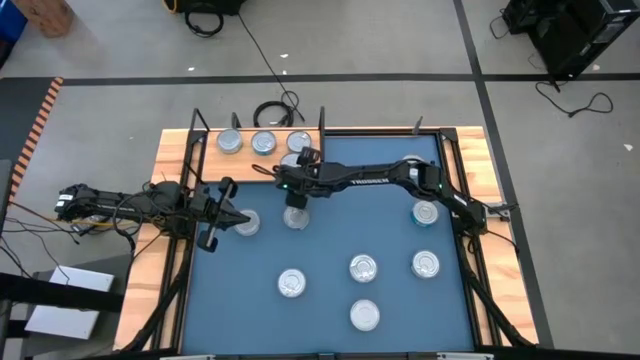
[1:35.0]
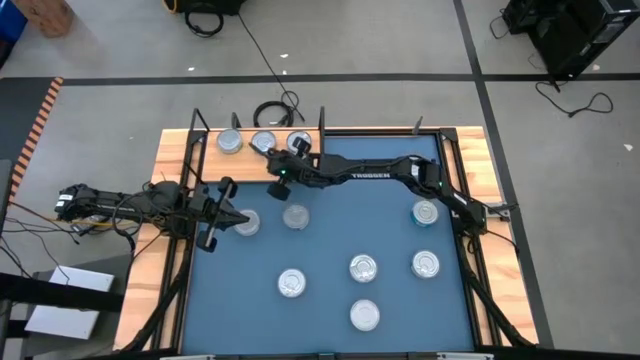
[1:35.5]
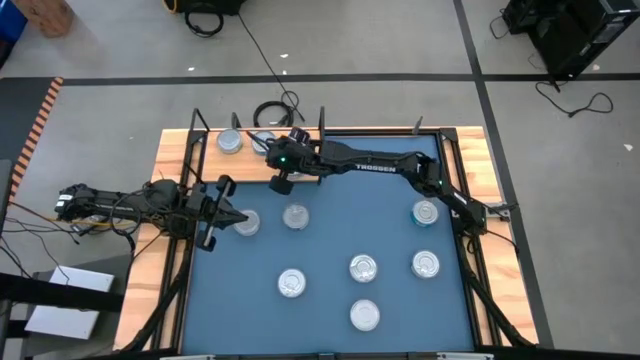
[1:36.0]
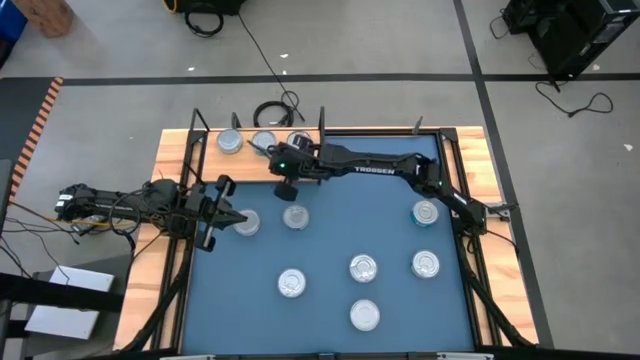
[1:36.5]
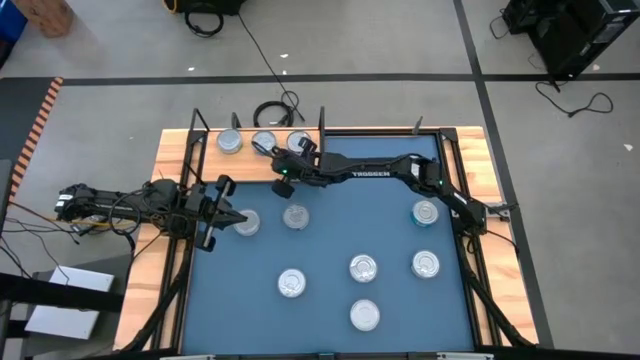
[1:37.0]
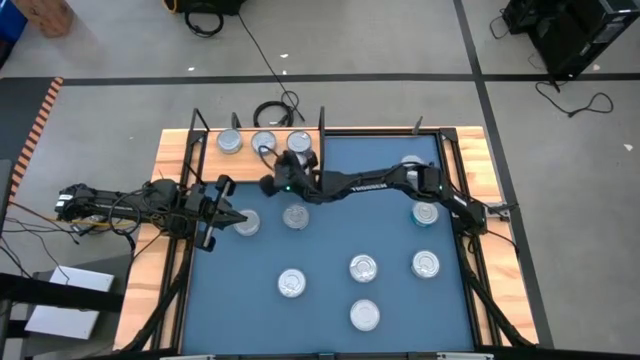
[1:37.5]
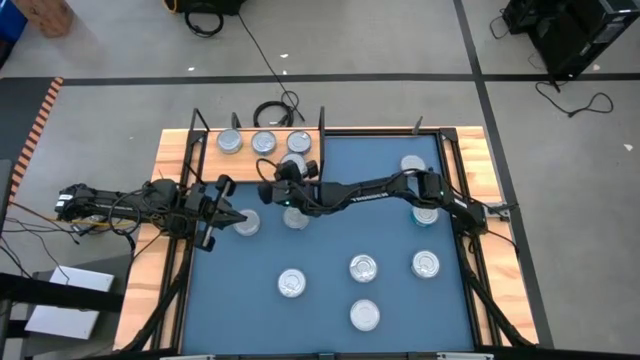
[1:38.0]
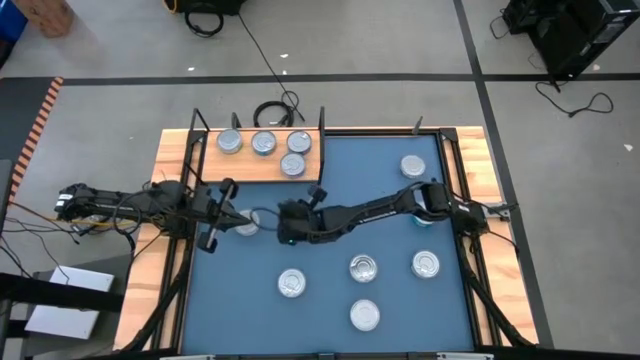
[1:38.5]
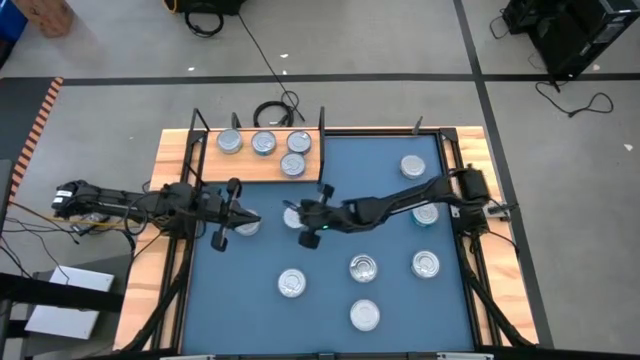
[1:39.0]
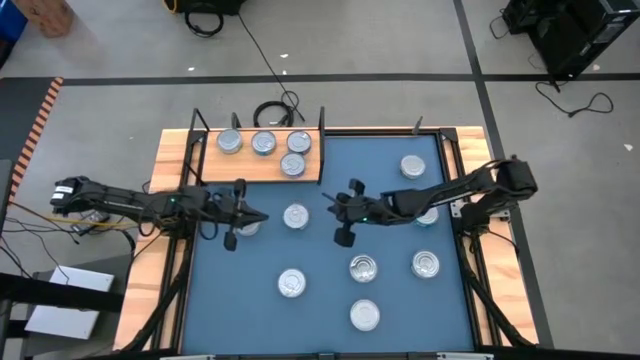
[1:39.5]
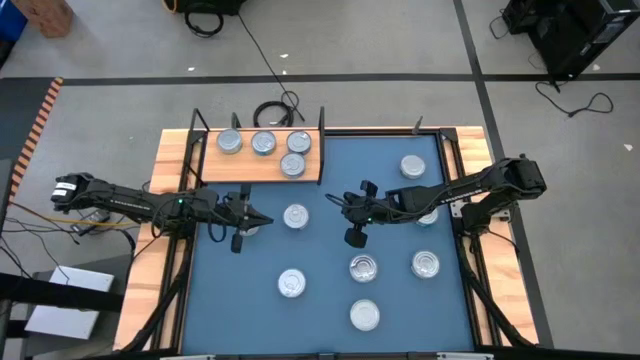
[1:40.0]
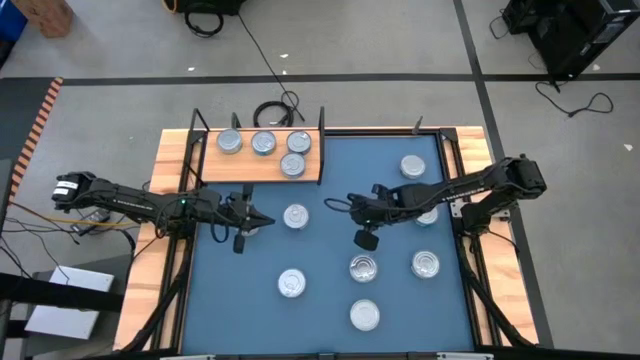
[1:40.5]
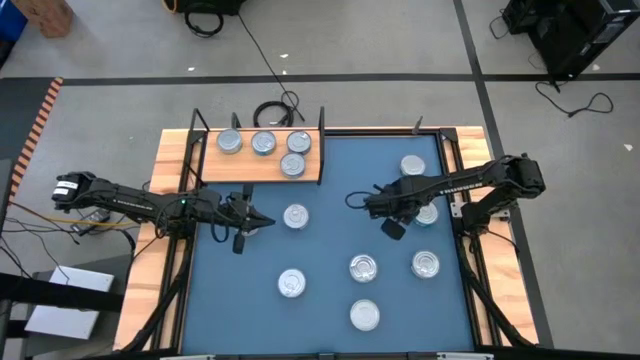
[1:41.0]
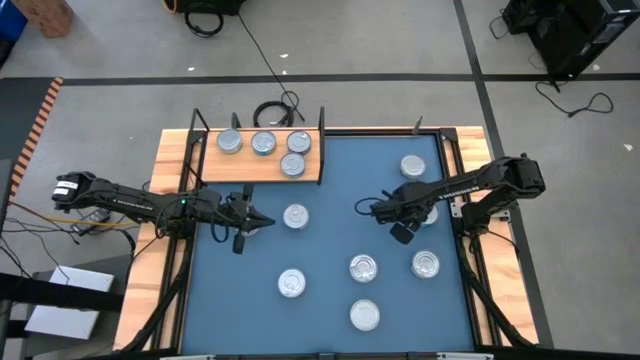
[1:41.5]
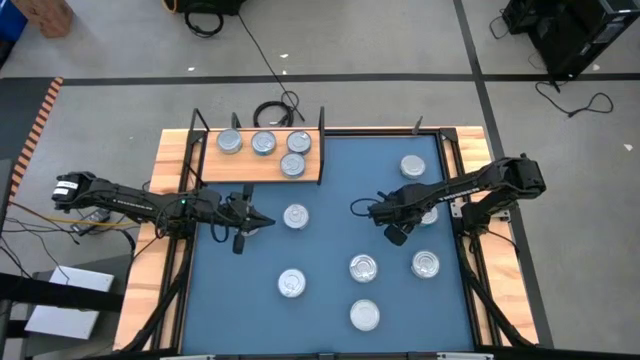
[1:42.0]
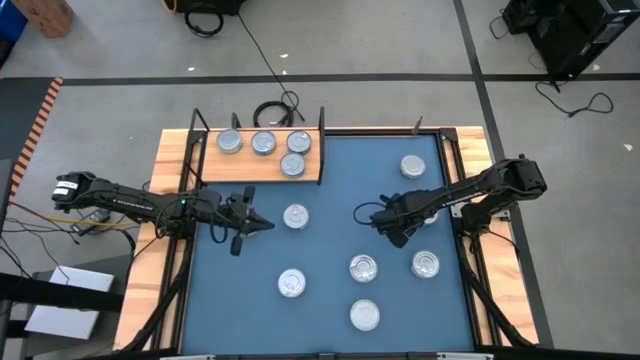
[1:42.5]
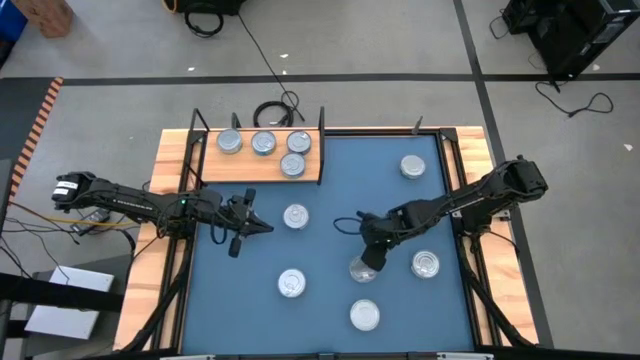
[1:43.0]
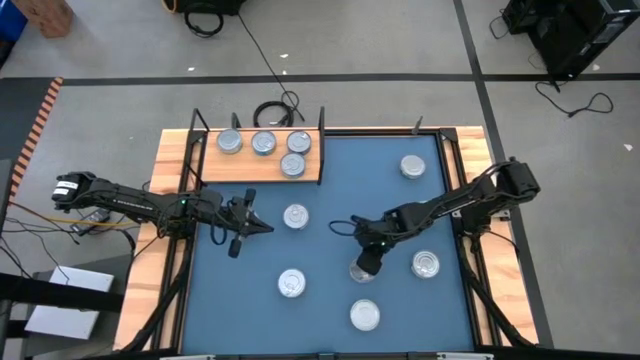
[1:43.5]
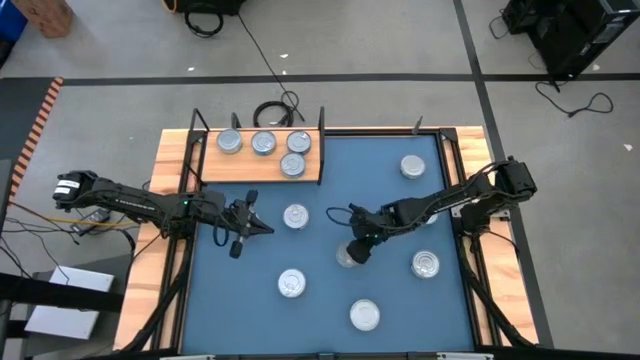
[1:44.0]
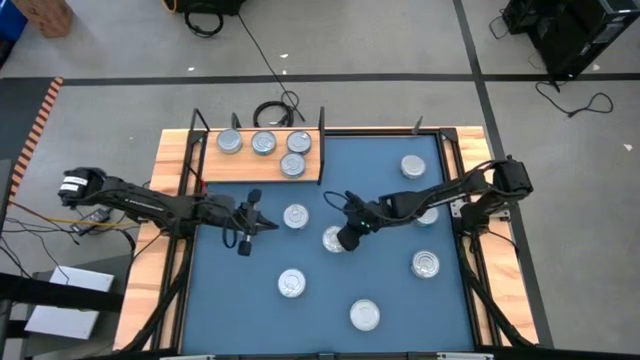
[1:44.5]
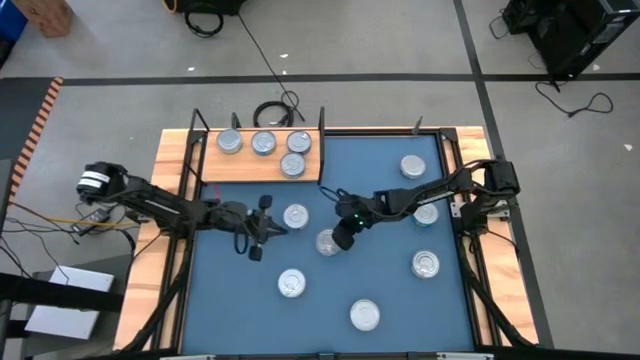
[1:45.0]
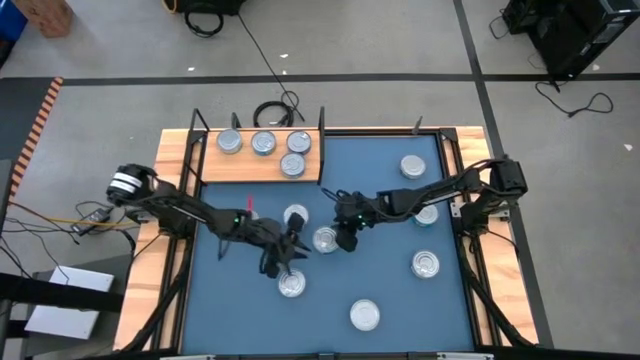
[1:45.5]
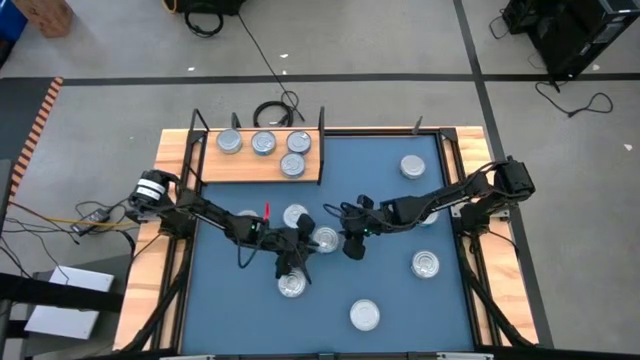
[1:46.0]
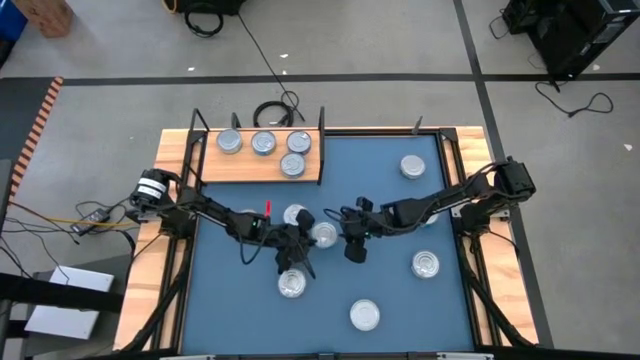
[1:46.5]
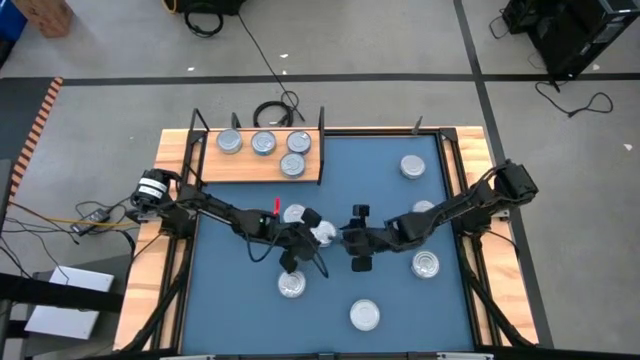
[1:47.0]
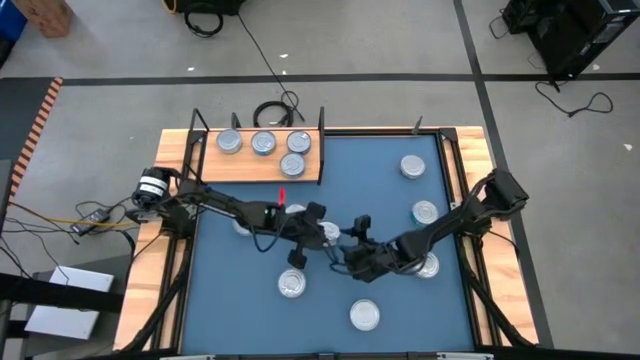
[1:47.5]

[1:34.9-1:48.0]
Task: Stack canned seafood by type on shelf
Stack the yellow blue tuna can on top of the other yellow blue tuna can on the shelf

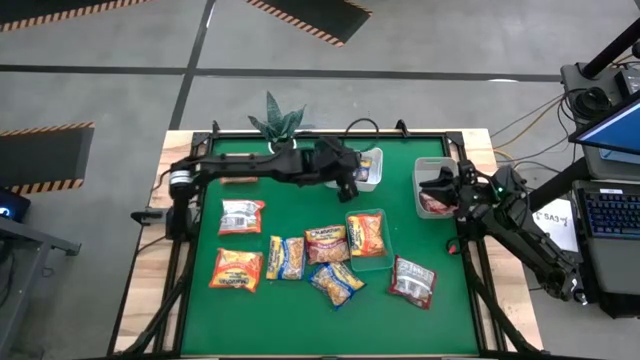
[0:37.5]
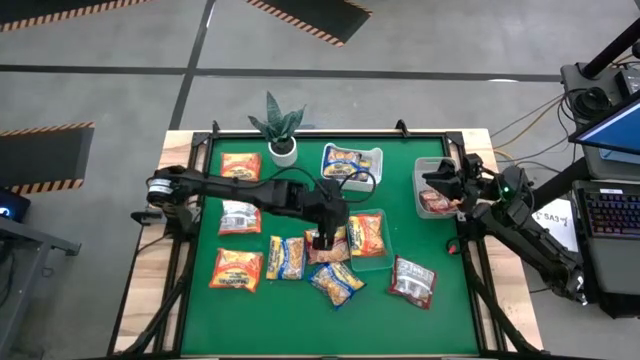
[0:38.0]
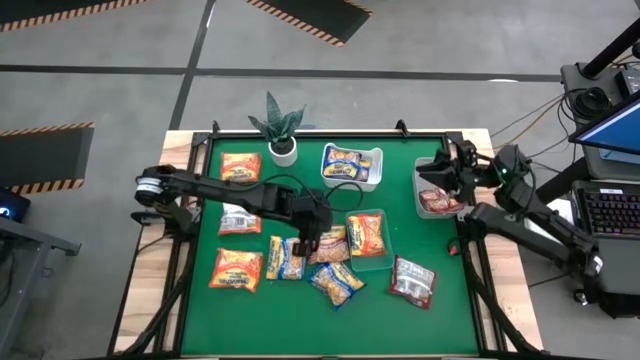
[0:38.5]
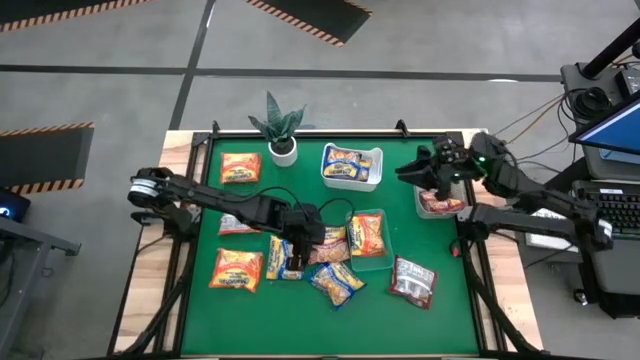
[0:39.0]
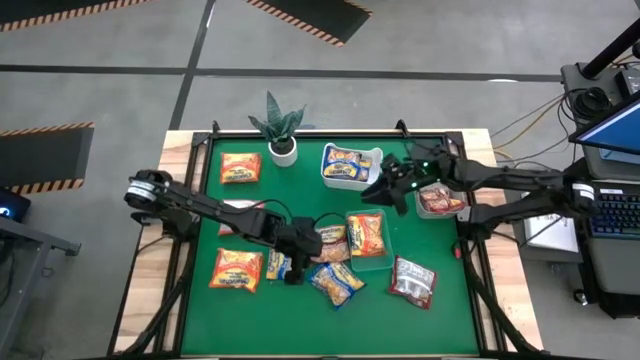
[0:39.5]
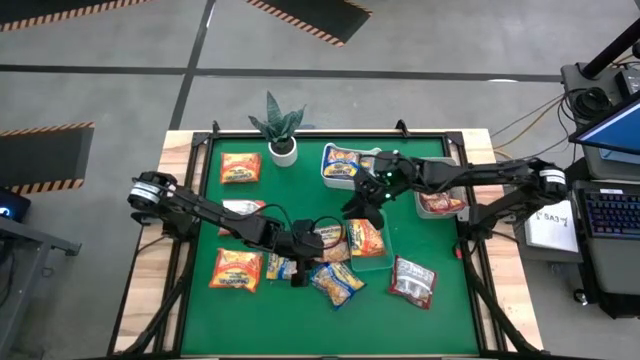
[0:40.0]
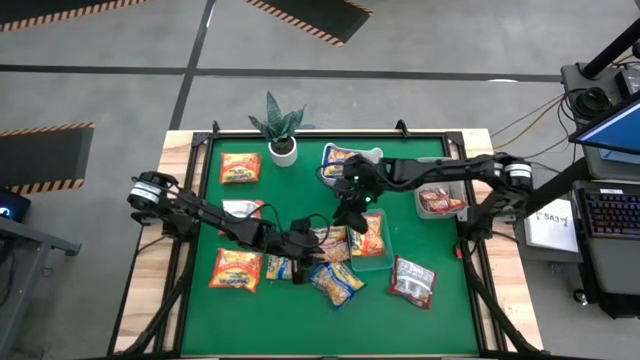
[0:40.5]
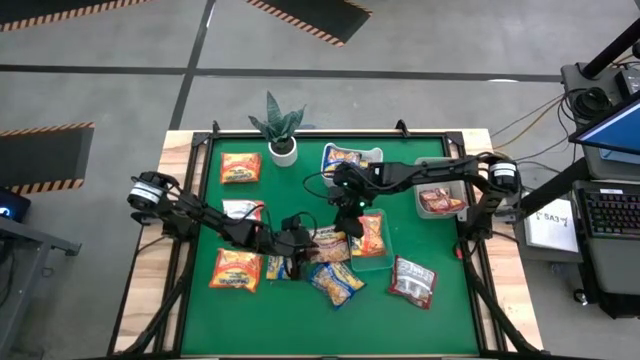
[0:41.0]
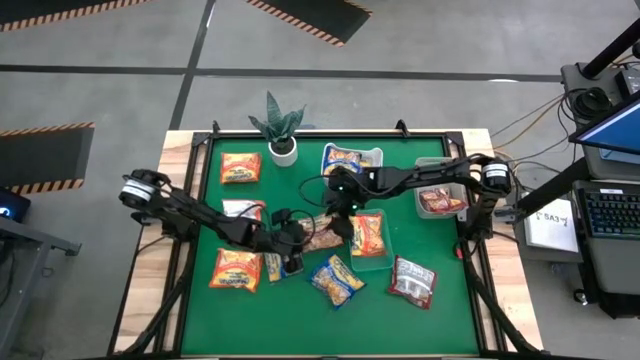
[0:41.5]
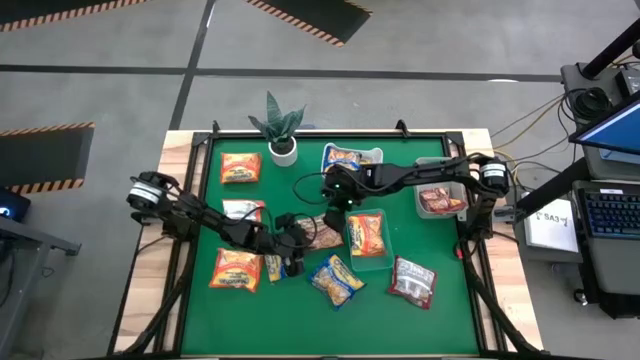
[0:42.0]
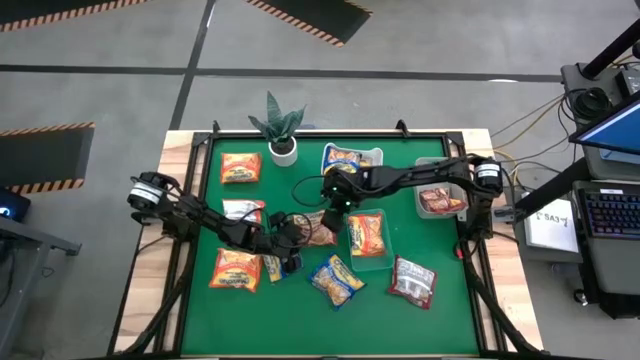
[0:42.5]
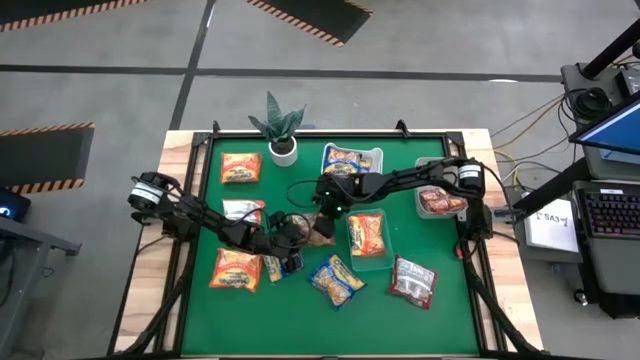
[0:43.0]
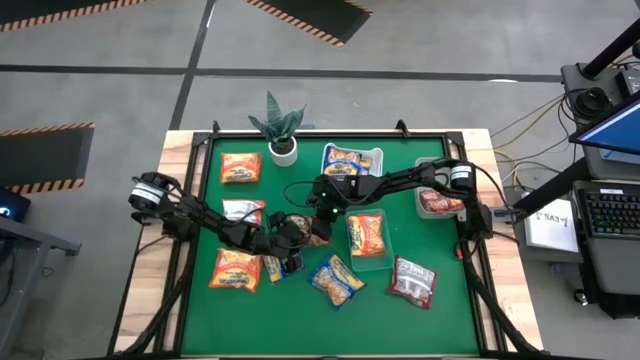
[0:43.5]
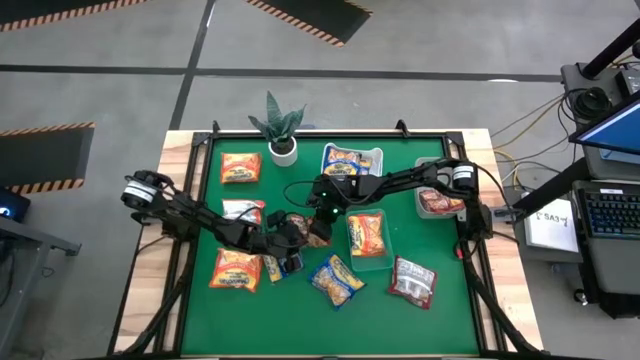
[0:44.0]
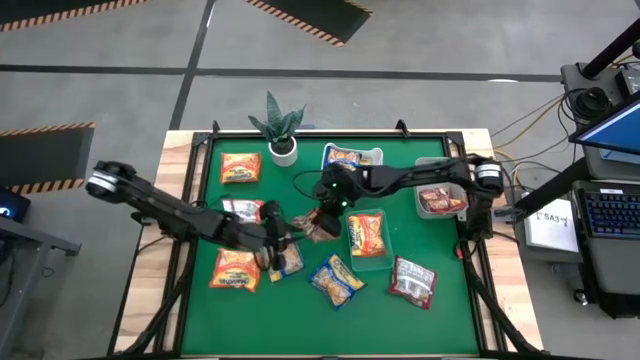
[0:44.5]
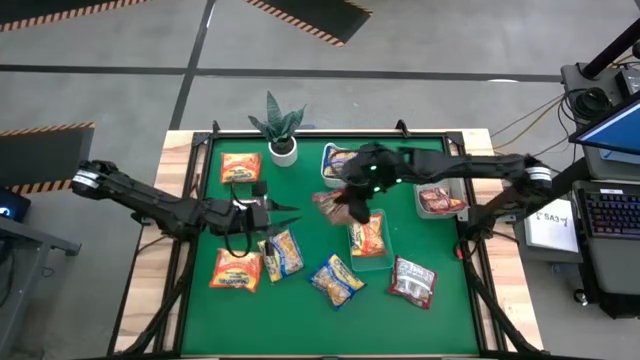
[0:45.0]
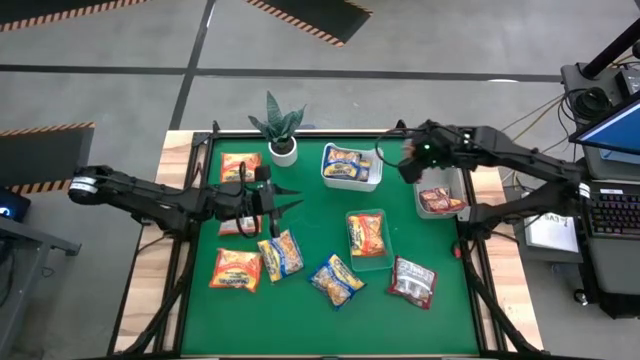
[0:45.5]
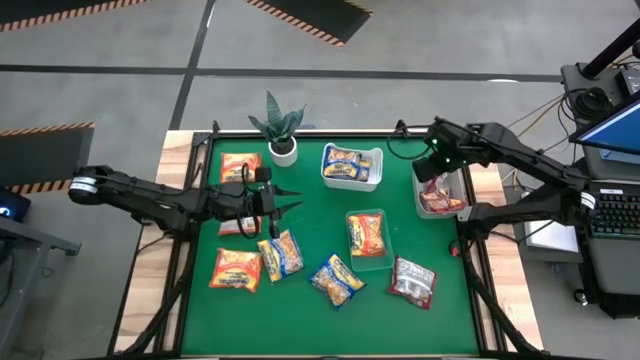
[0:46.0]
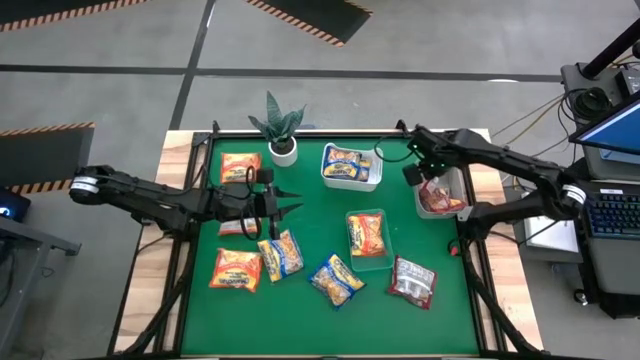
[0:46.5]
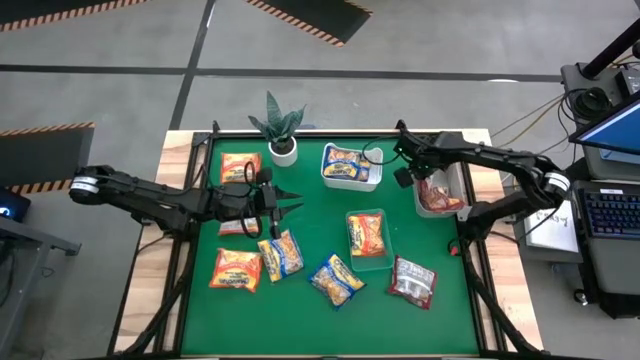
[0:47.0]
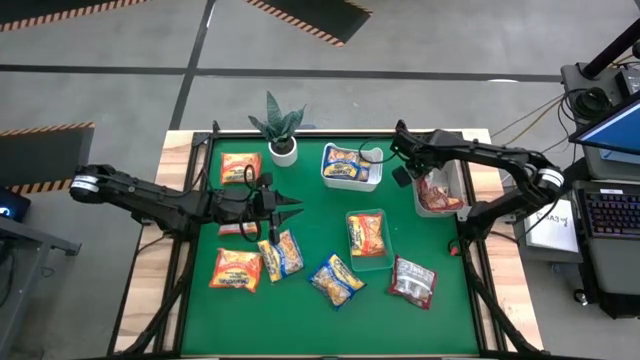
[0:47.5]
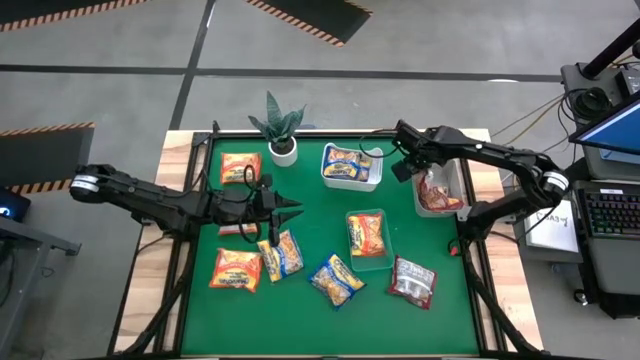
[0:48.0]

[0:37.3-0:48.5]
Task: Sort Maruchan noodles
Put the red noodle pack into the gray bin
